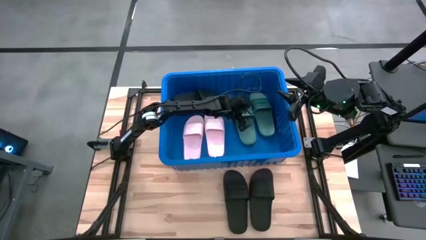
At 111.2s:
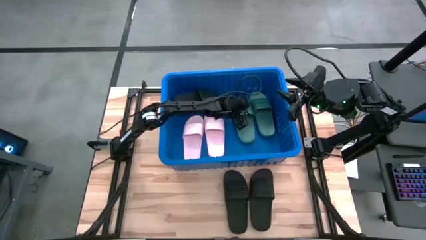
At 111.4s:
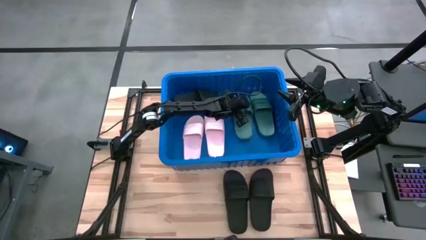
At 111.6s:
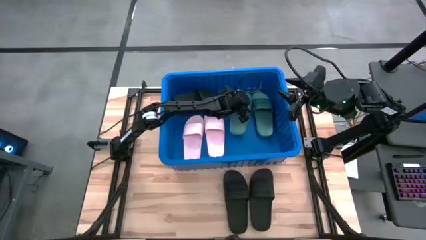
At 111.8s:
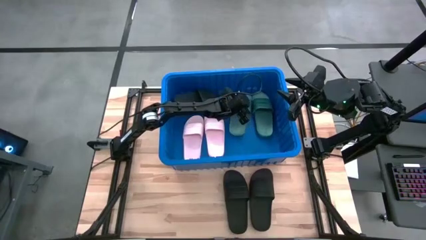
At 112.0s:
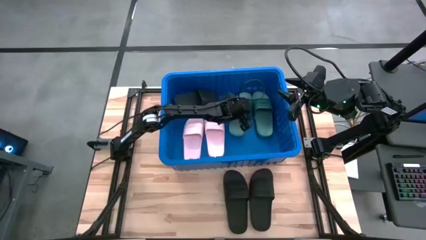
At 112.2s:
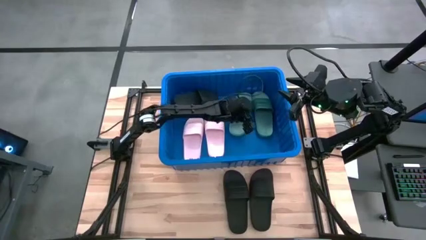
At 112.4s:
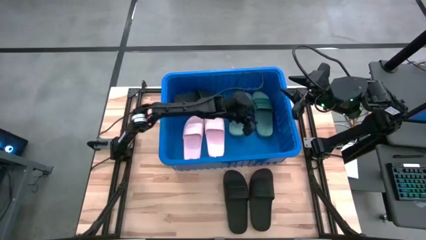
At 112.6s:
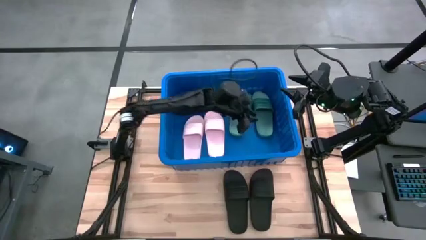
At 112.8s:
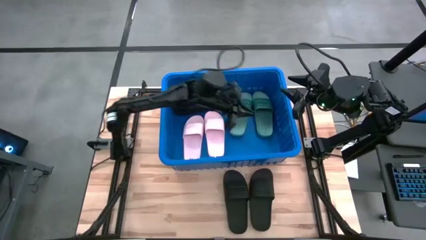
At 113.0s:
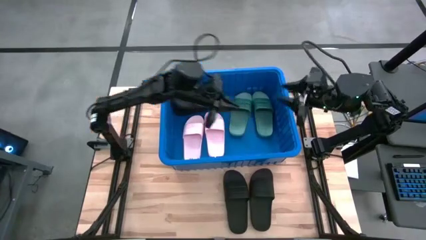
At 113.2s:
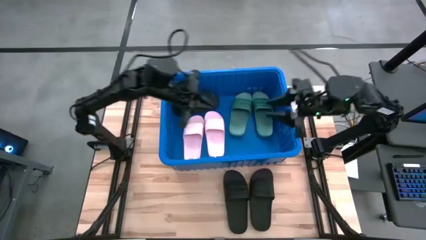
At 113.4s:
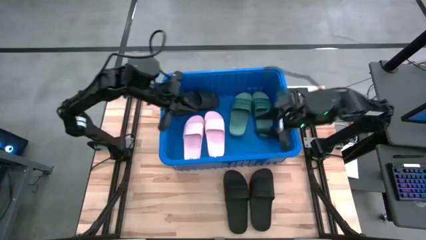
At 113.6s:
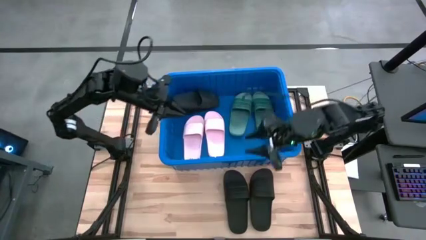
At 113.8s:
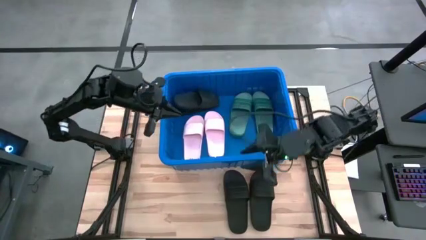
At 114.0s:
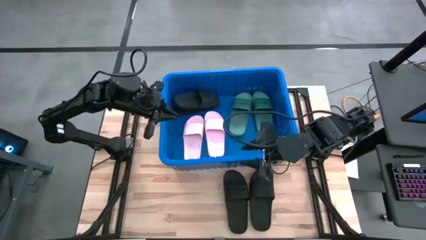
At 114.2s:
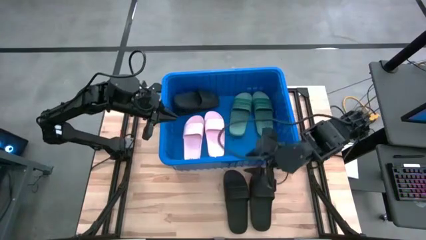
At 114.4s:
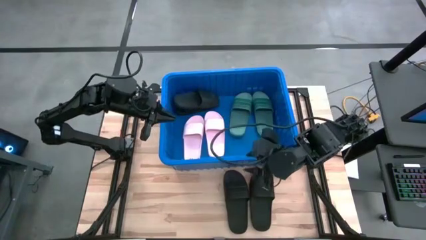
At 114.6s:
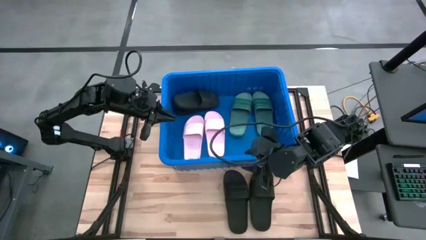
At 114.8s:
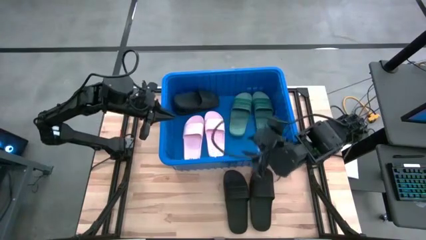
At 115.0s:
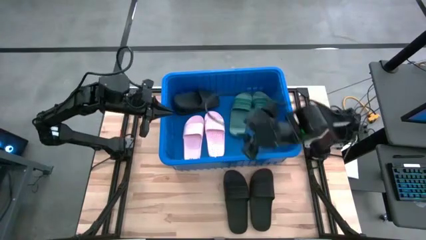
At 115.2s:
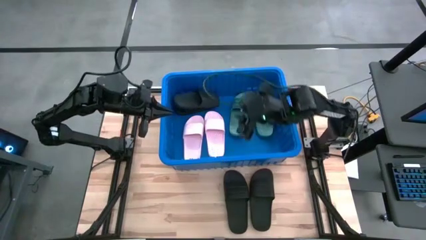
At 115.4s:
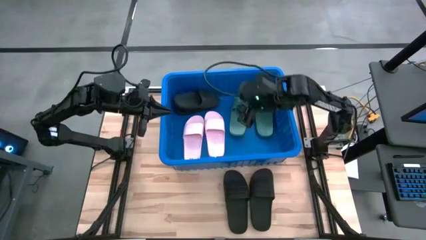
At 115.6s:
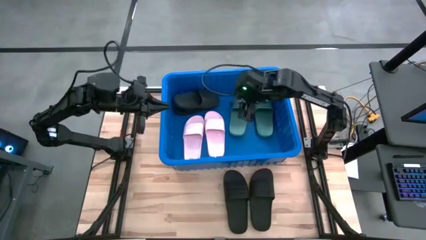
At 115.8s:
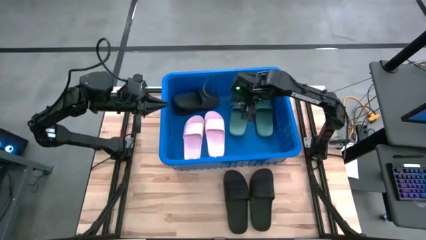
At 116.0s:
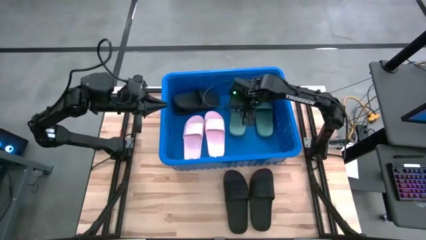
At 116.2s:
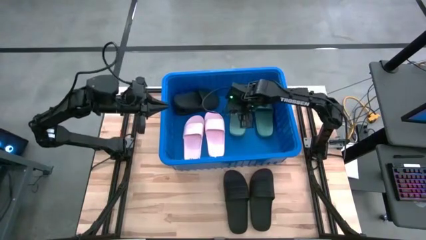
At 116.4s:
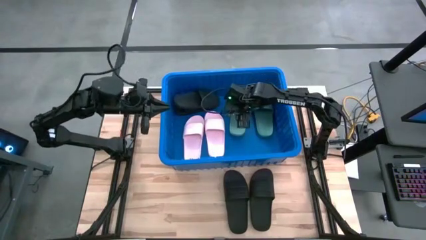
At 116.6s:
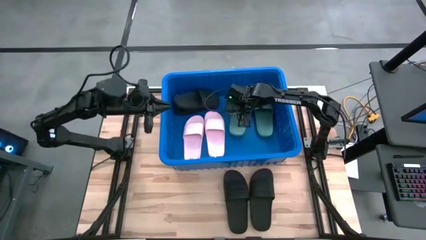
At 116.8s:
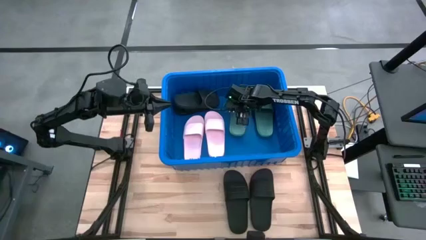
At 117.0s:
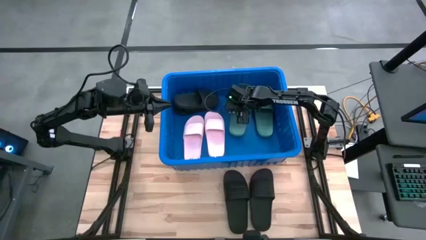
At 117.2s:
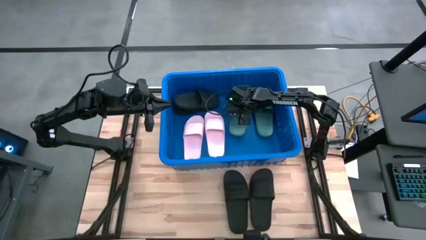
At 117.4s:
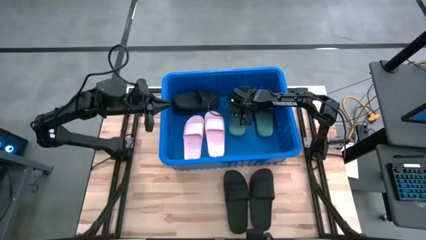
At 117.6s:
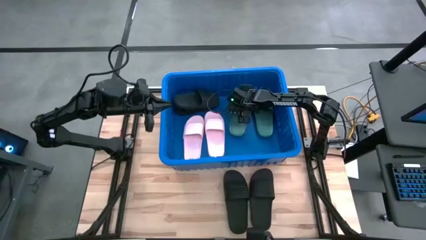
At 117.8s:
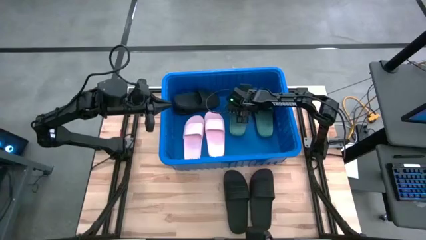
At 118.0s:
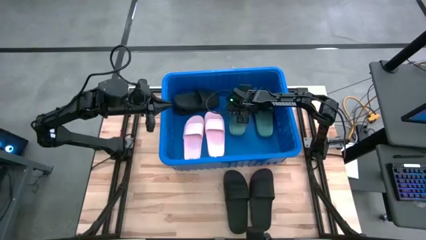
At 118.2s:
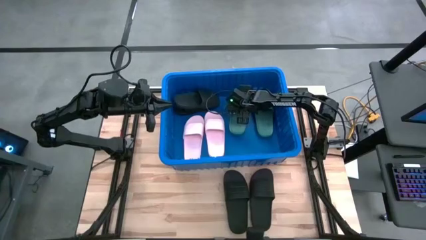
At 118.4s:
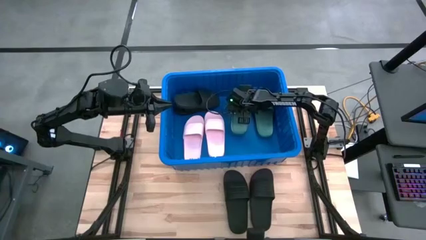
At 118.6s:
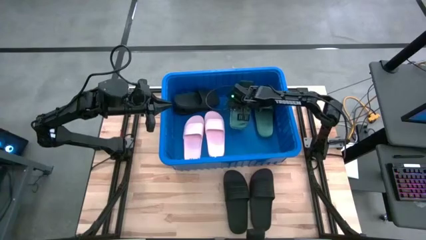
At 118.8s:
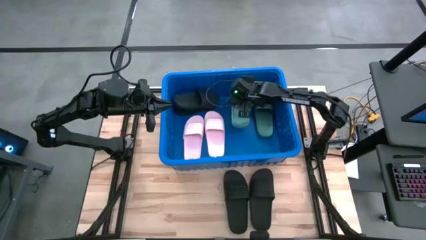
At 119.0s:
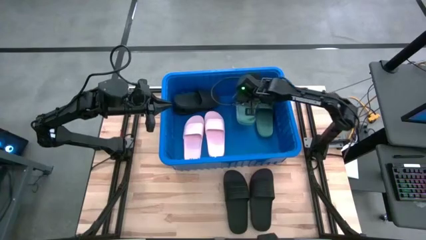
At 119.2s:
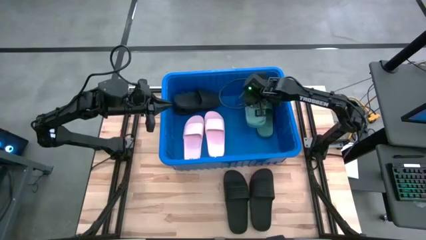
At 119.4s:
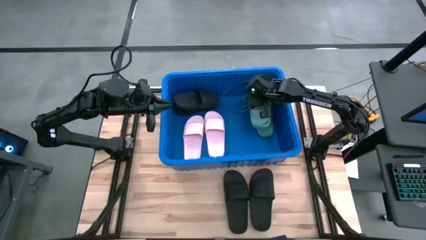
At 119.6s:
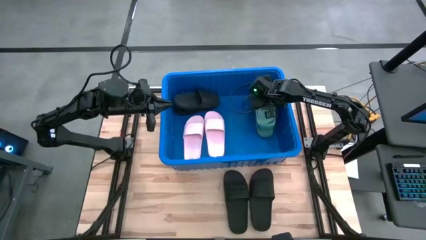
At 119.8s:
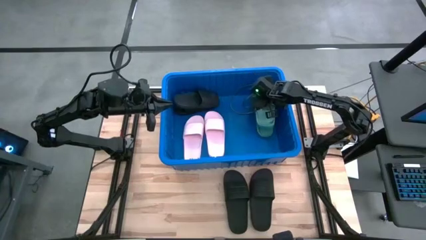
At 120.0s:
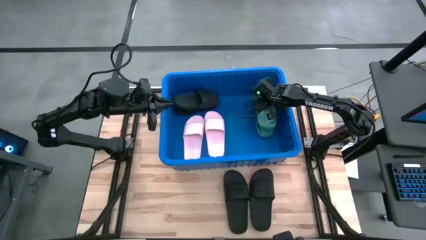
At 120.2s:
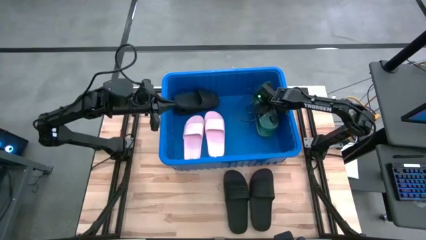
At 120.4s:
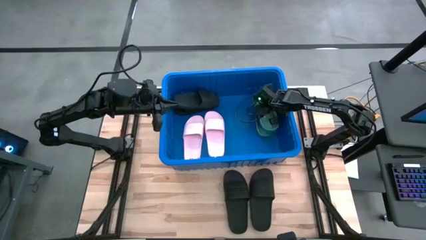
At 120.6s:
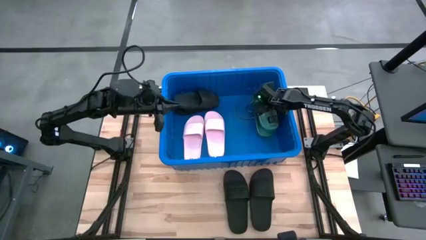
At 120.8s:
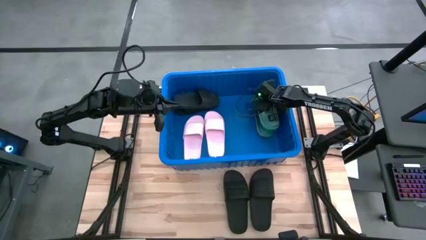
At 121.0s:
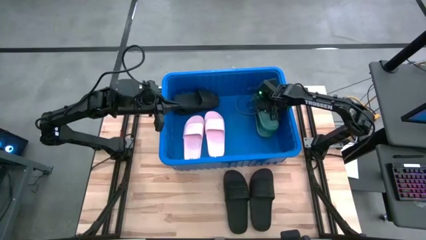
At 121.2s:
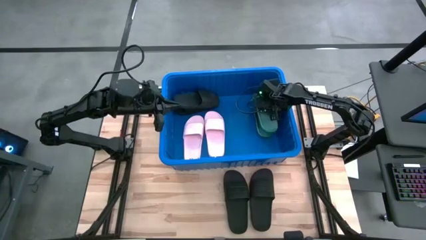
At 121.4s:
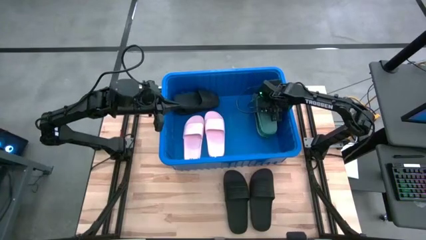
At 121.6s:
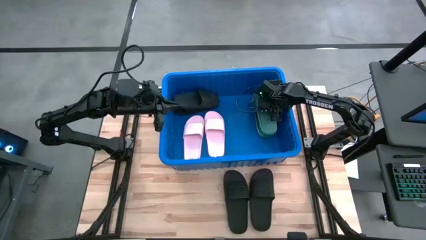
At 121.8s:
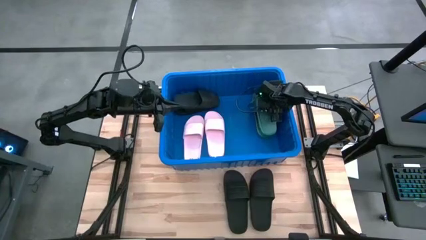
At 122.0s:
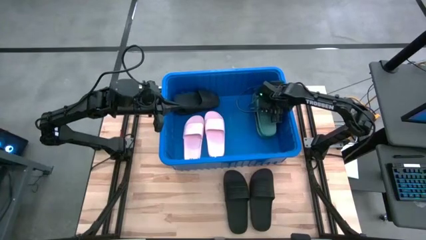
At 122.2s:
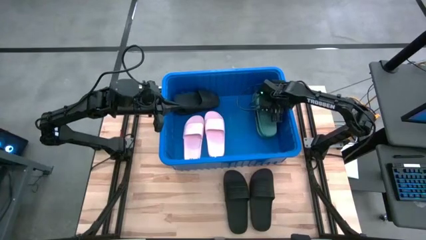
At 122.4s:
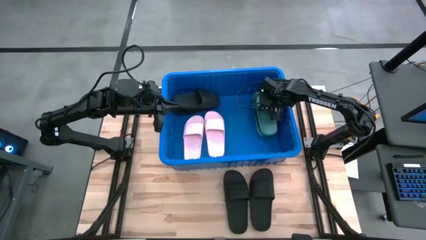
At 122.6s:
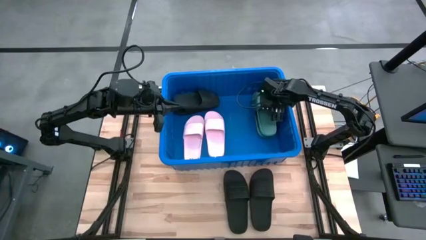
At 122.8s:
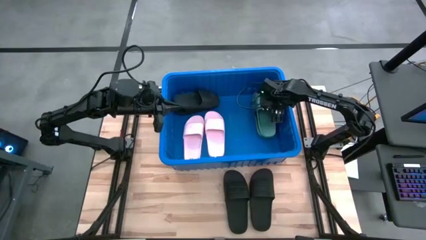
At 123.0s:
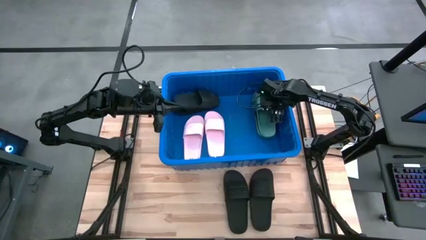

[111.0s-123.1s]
Task: Pick and place slides into bin
Put the green slide into the blue container

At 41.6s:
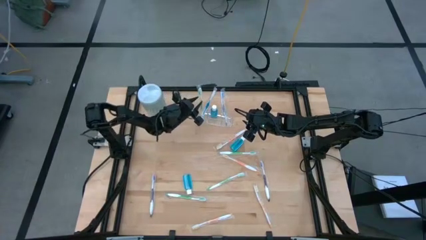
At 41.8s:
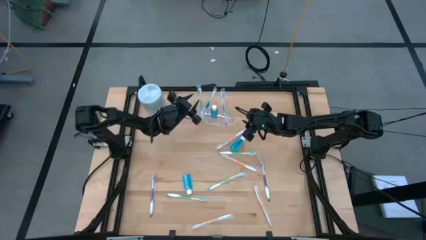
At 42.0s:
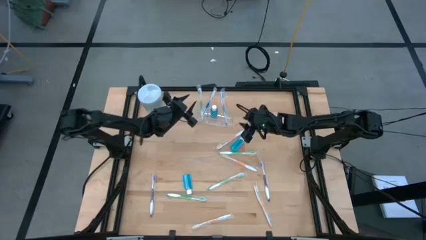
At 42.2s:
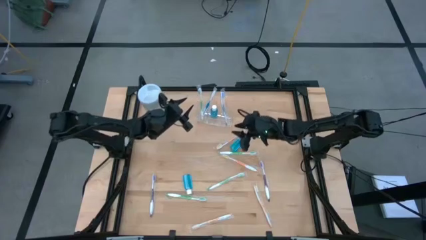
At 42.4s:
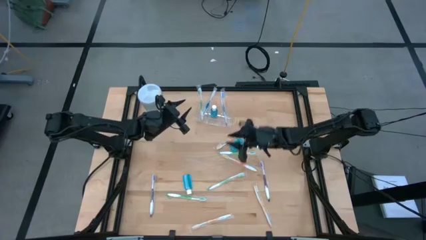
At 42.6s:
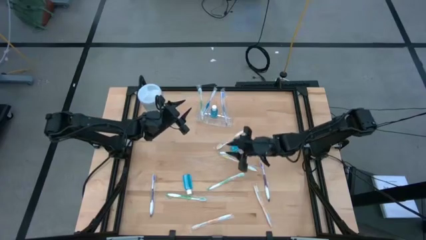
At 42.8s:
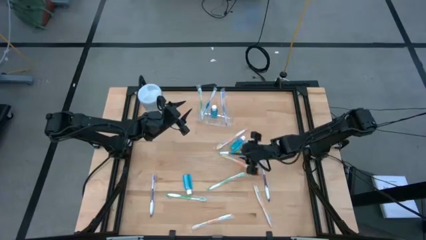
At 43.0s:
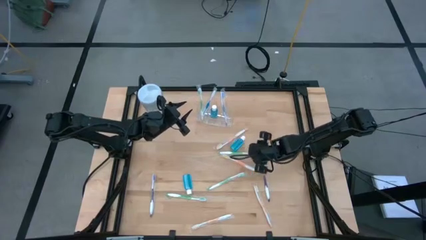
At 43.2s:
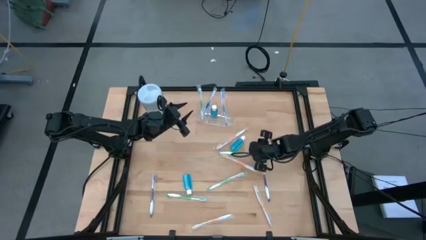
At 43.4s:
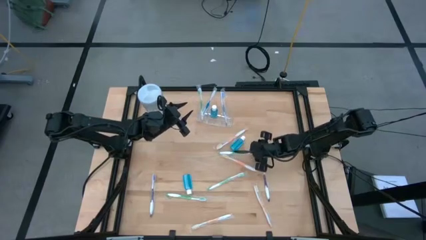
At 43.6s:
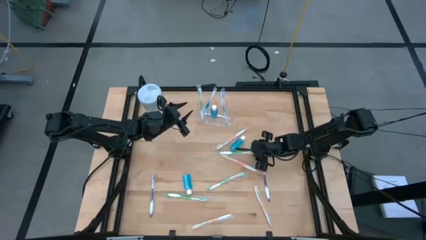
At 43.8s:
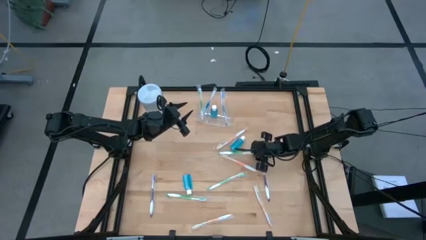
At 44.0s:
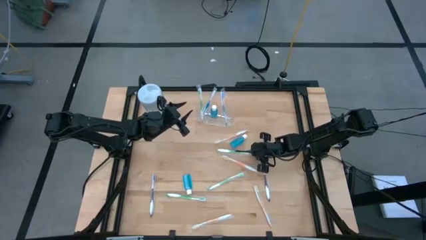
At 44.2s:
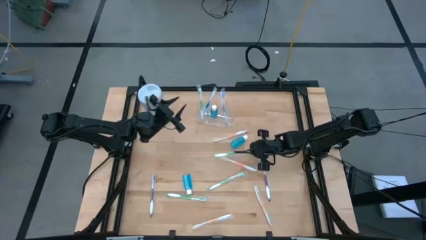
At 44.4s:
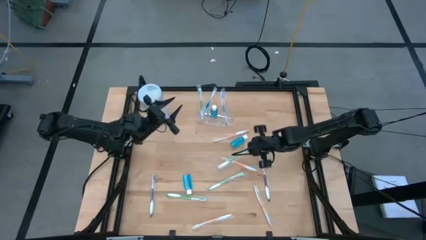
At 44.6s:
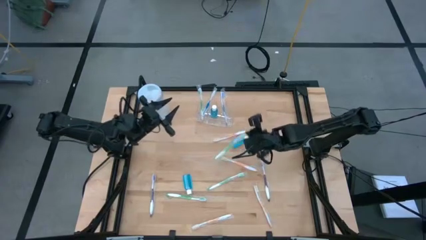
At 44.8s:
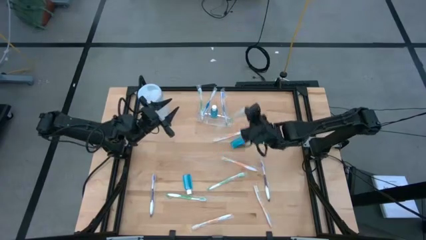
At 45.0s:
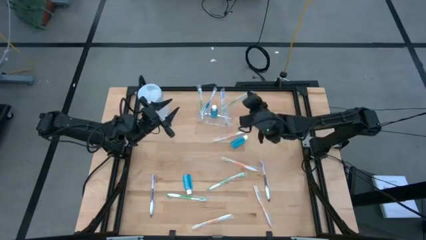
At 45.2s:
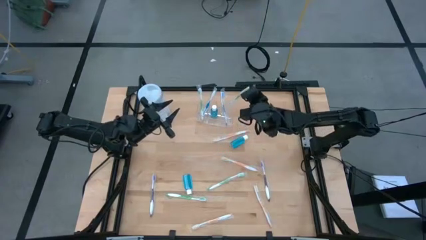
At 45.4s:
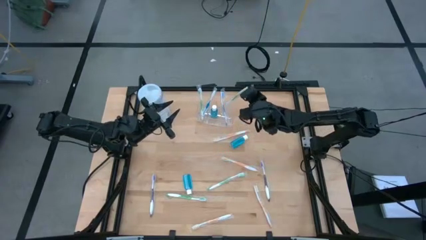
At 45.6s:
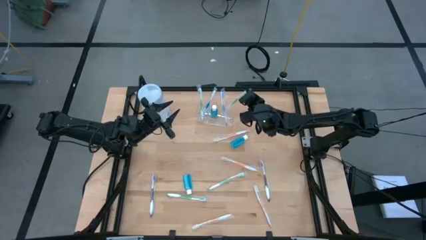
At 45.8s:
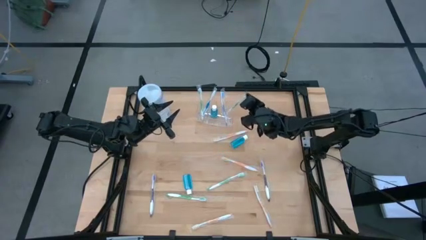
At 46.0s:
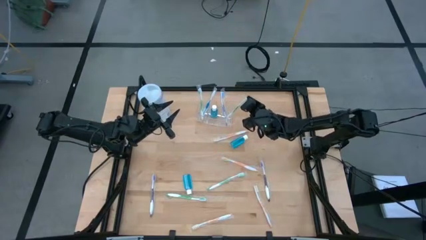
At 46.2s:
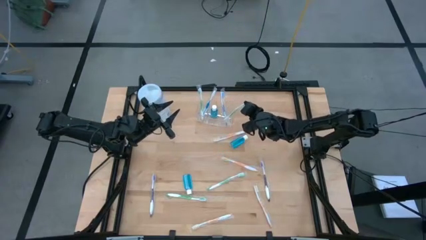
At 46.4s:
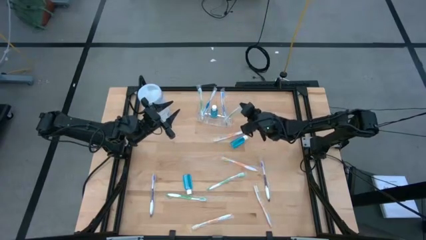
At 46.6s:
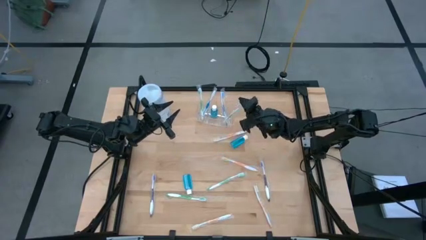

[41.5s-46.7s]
Task: Pick & Place toothbrushing station
Put the green toothbrush into the transparent organizer
